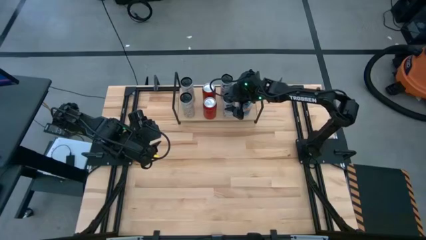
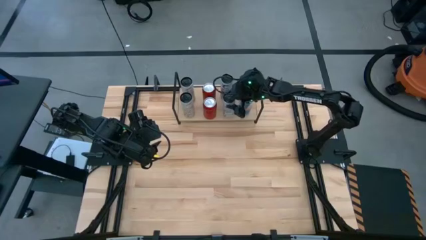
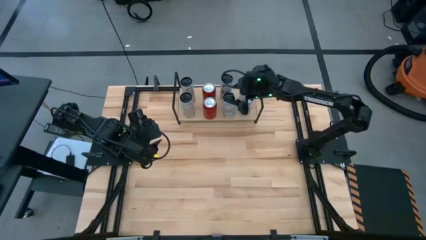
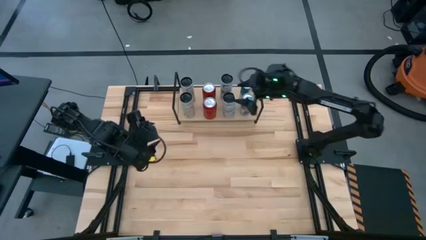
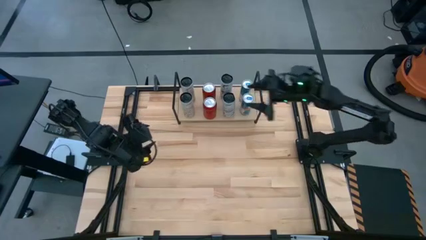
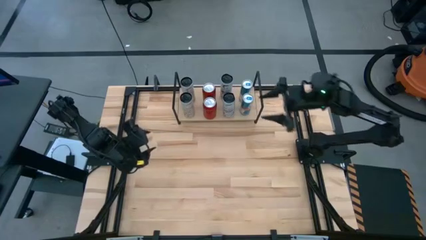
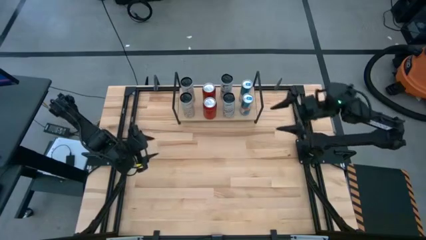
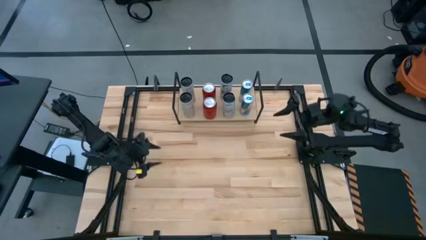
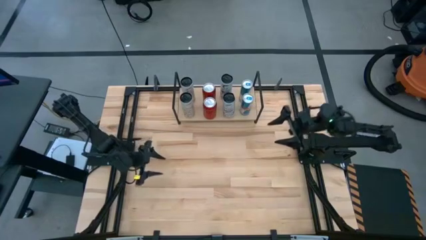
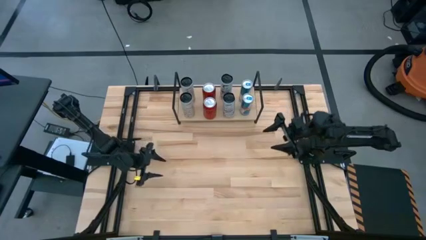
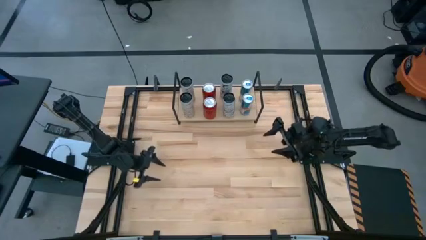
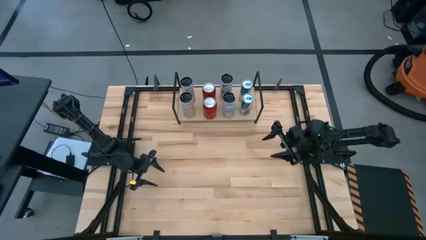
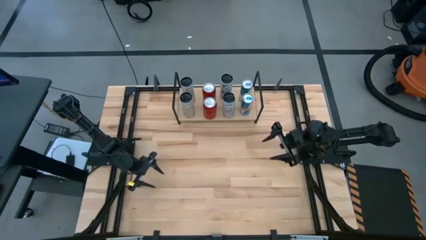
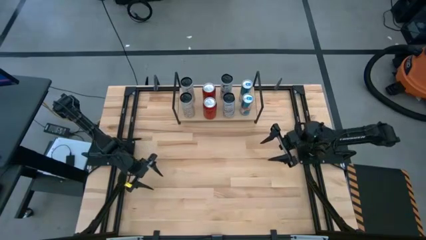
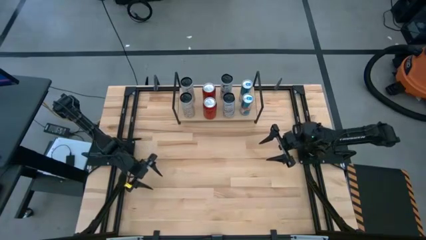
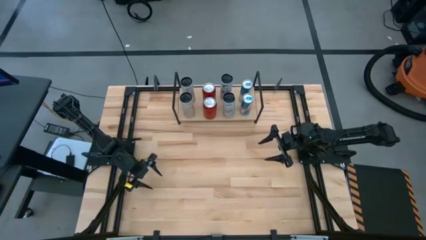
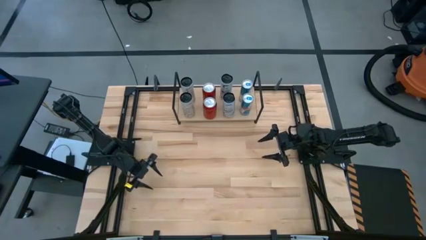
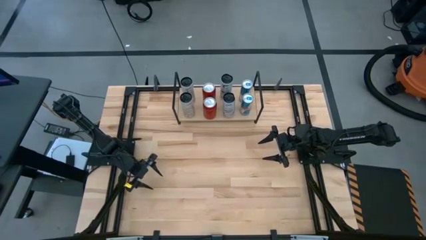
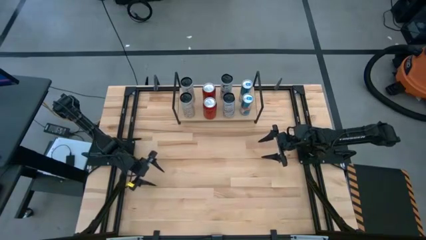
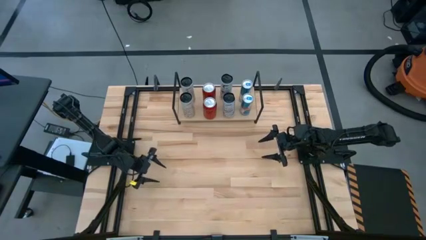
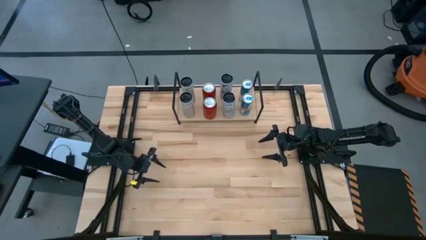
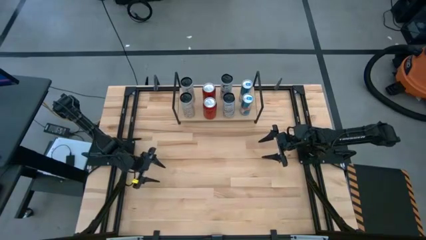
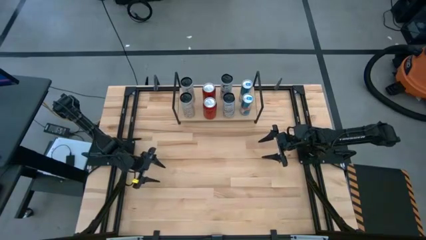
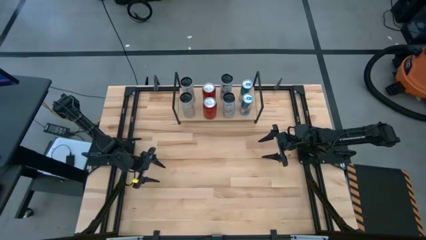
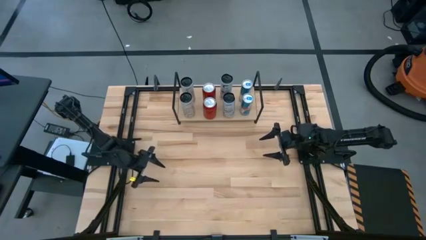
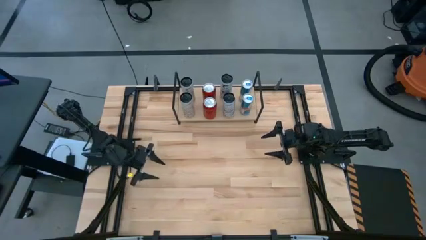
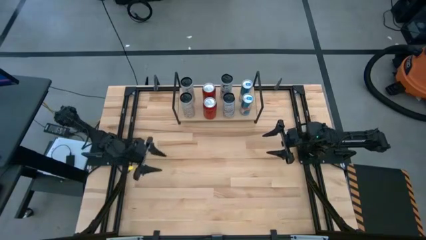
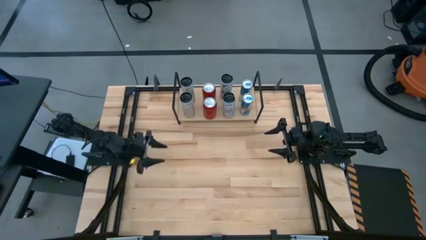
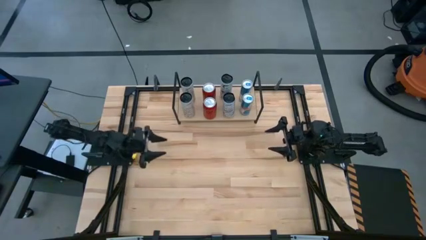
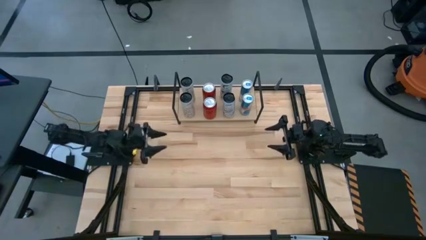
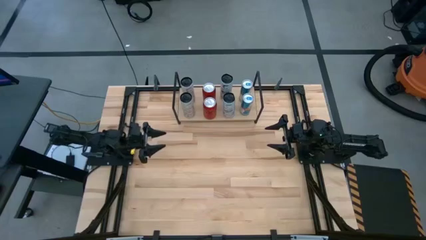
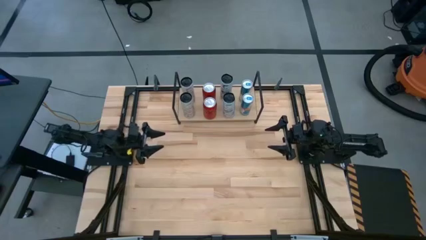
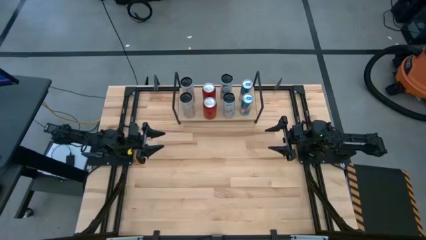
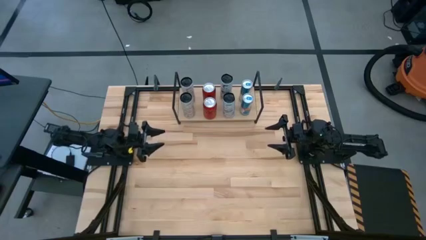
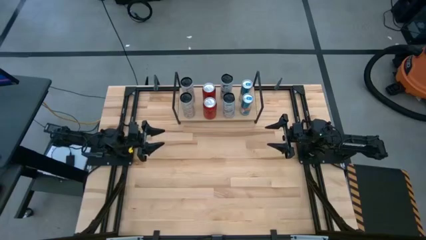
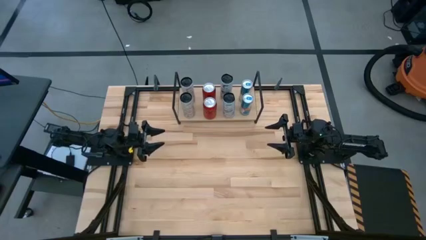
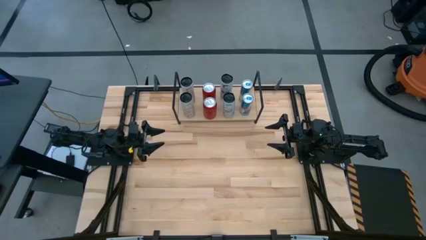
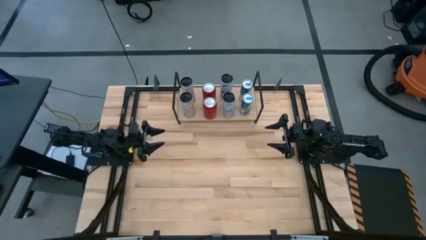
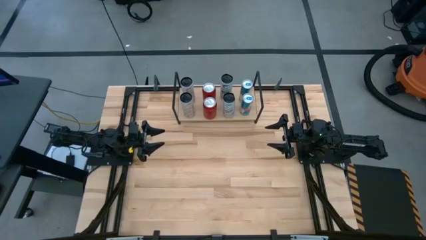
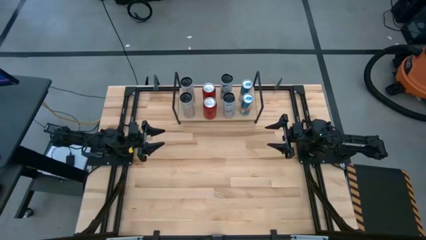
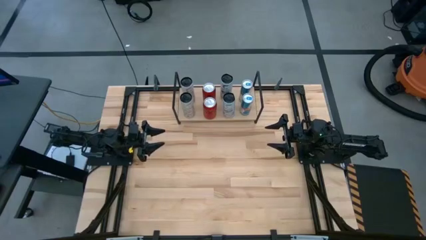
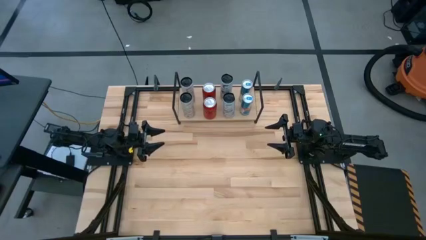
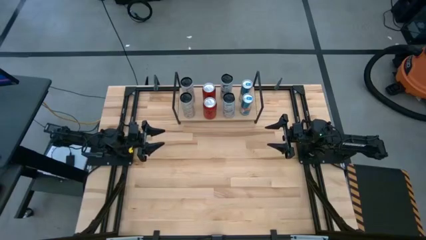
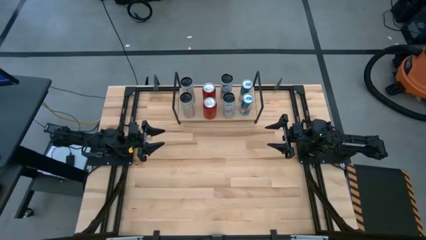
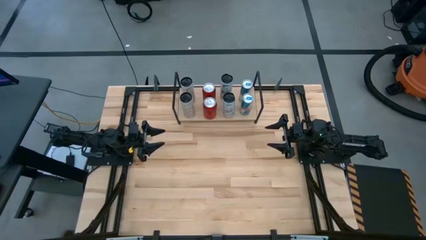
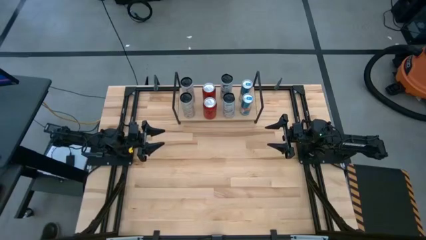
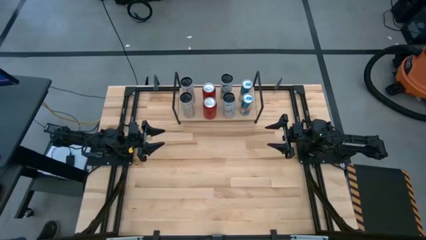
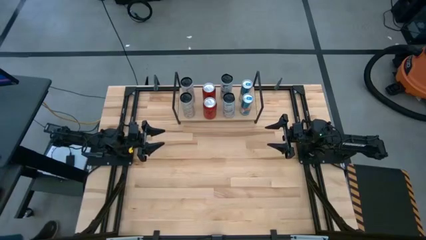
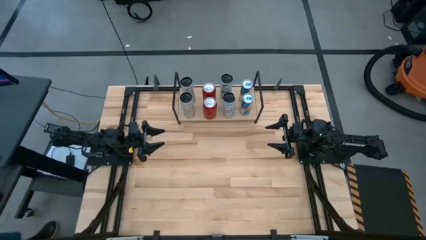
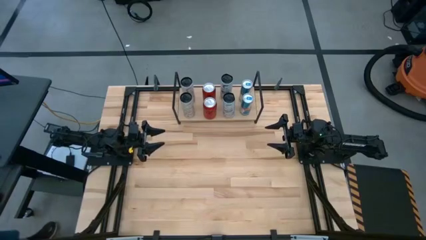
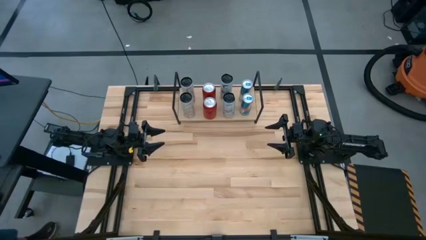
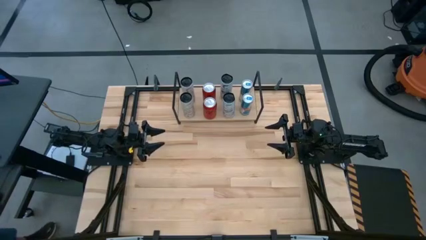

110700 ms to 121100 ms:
Task: Place canned beverage on shelf
Return to Home Position

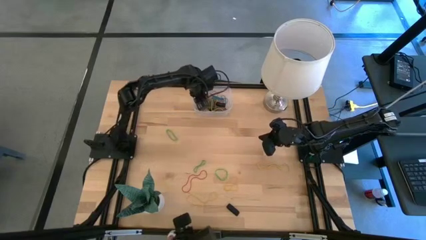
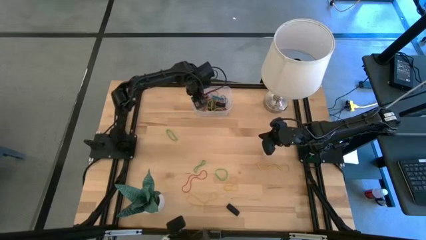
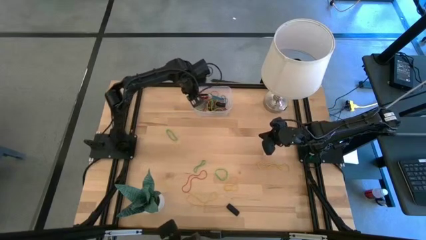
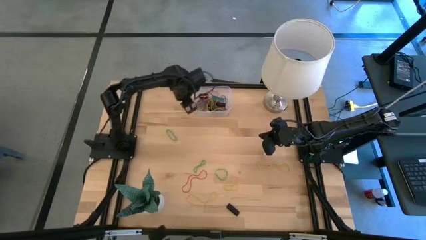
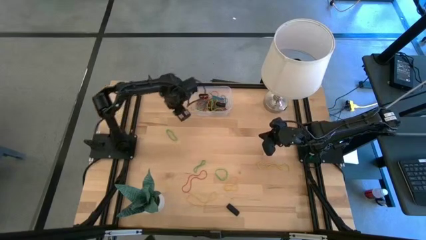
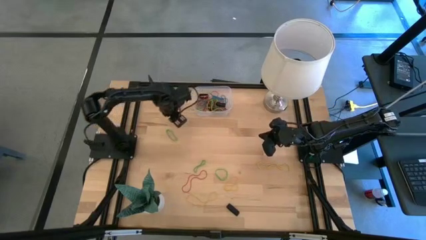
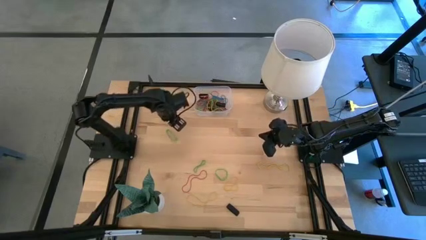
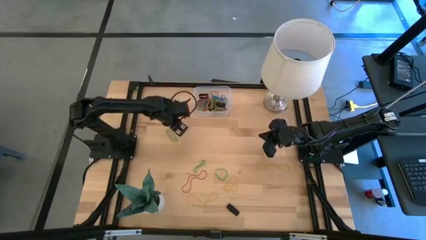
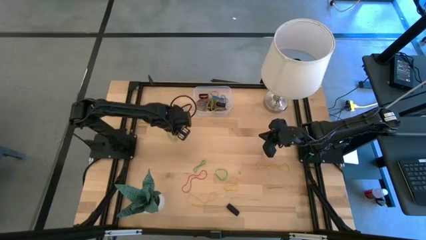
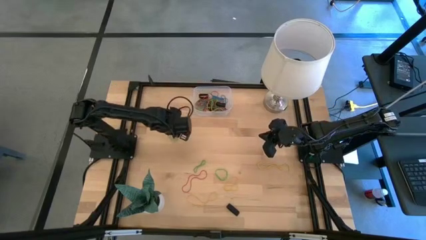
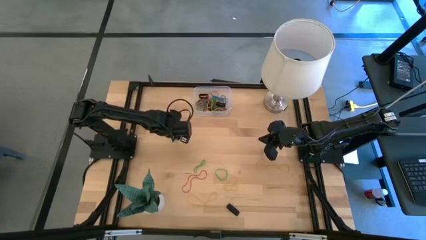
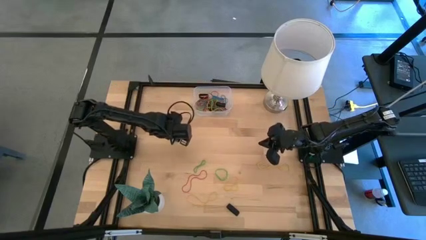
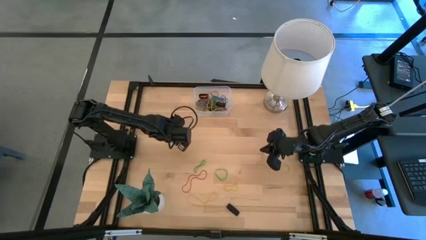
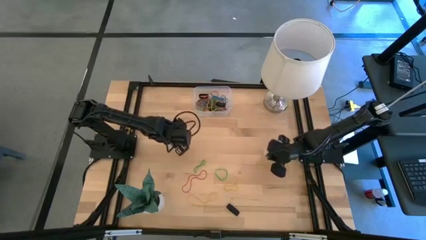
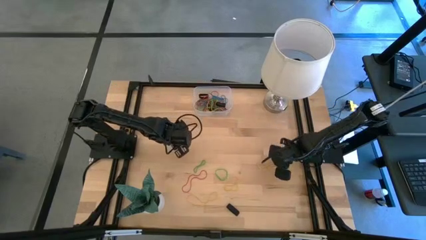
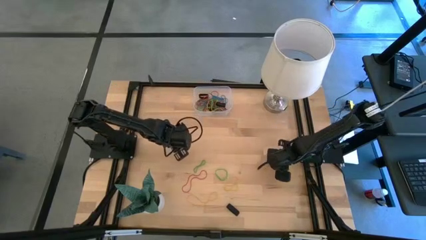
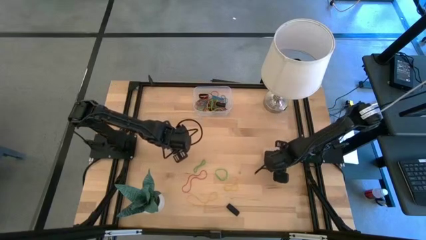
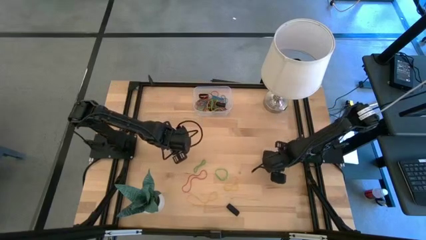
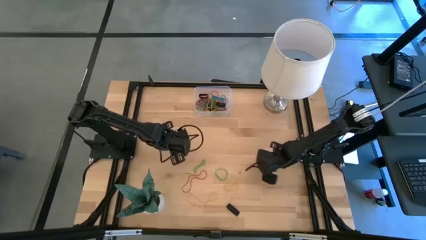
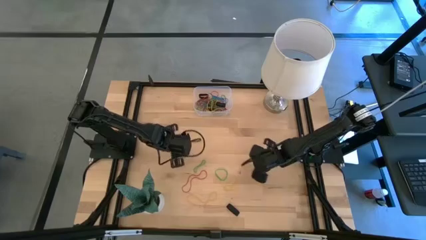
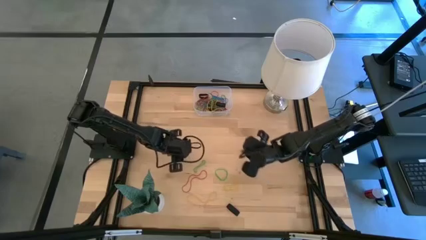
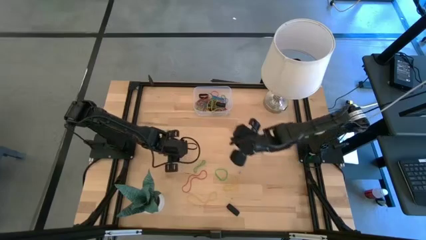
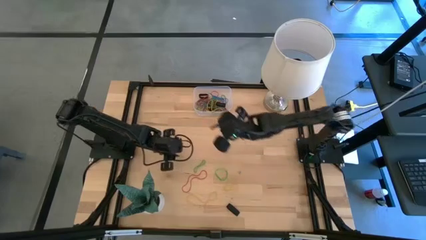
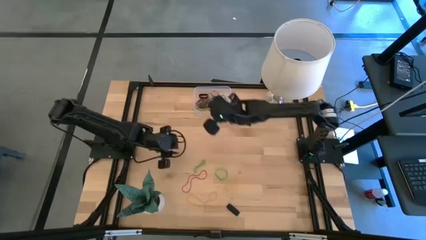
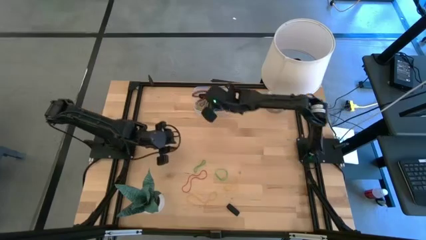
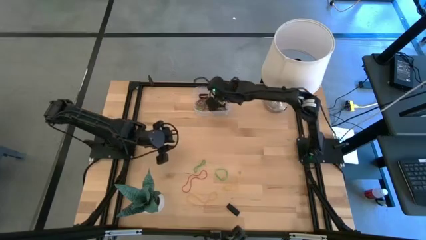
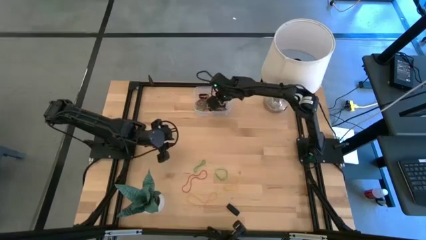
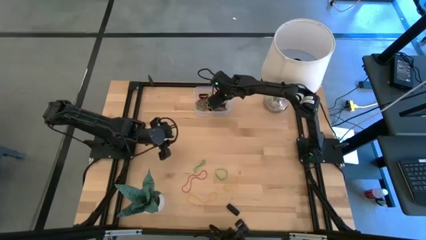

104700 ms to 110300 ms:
Task: Pick and place rubber bands into bin
Put the yellow rubber band into the transparent bin

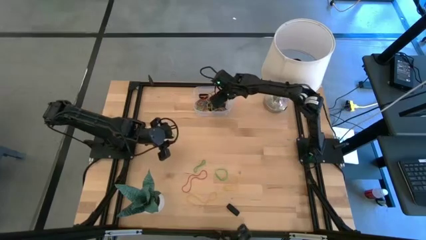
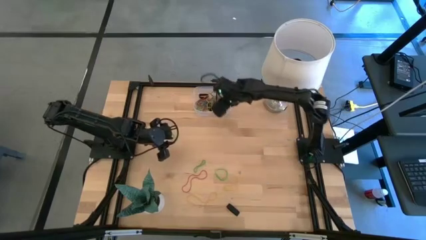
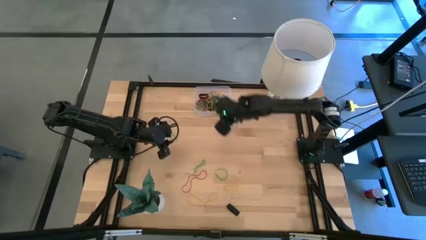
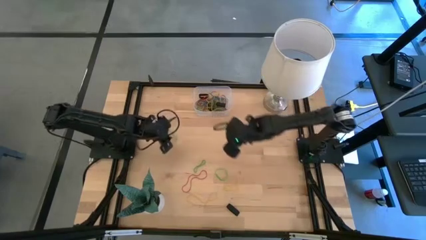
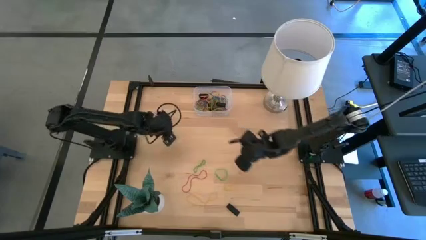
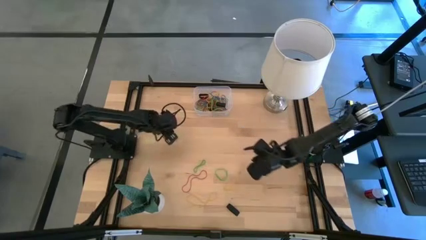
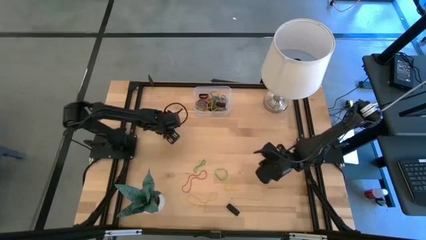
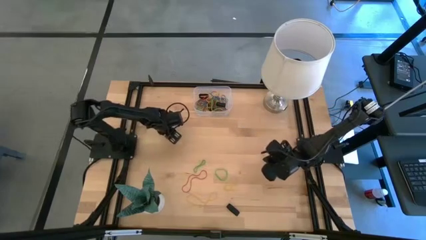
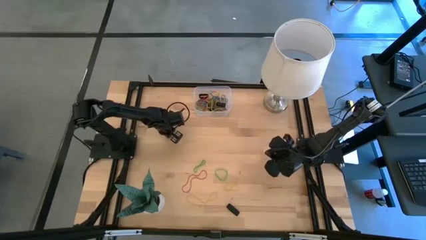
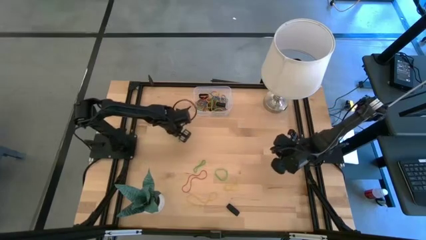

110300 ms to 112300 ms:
Put the green rubber band into the transparent bin
